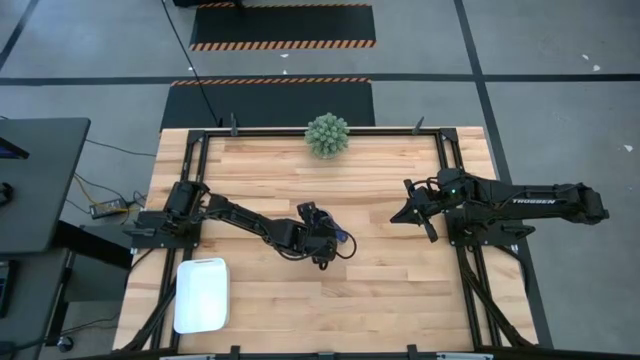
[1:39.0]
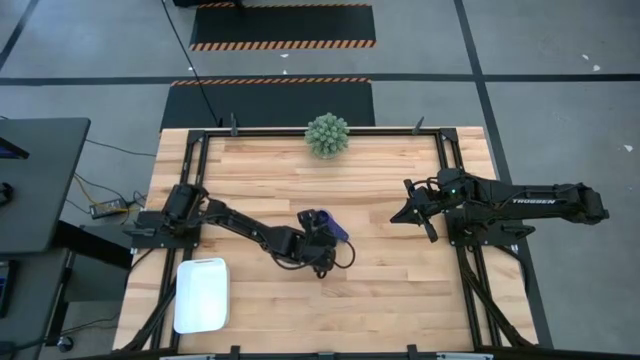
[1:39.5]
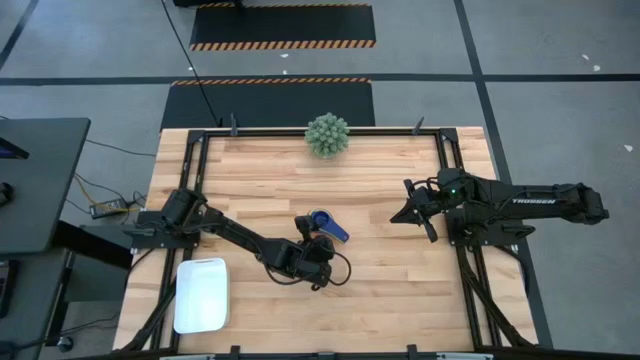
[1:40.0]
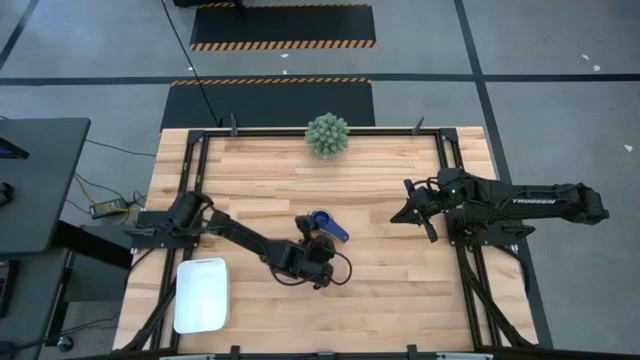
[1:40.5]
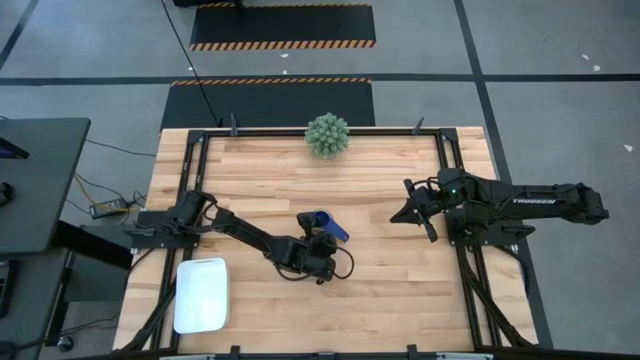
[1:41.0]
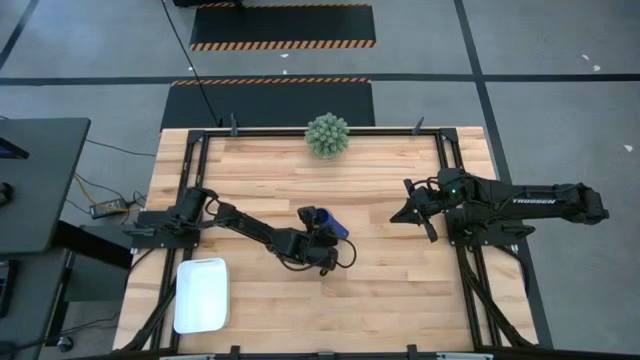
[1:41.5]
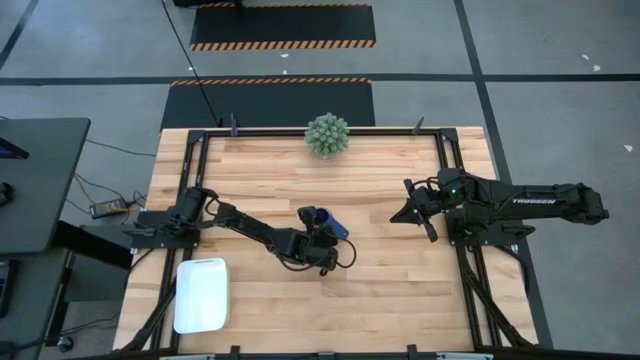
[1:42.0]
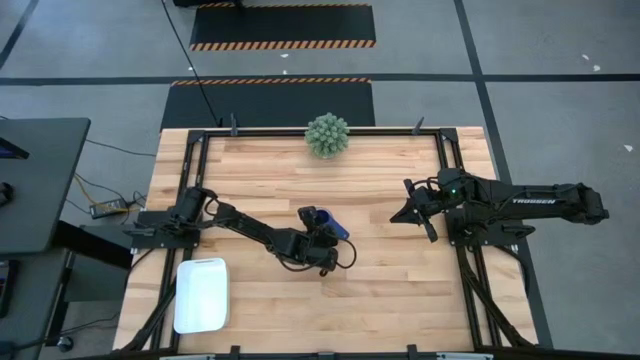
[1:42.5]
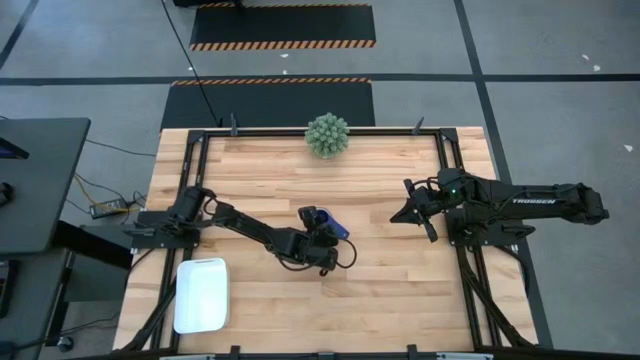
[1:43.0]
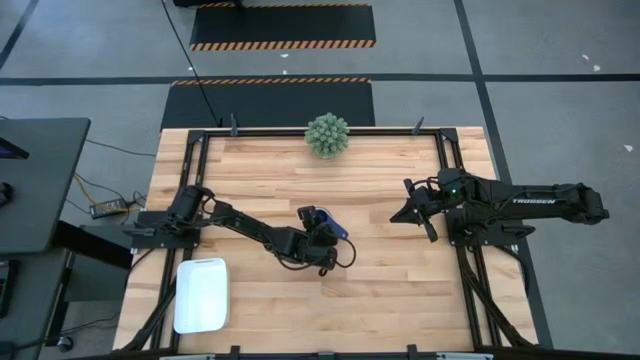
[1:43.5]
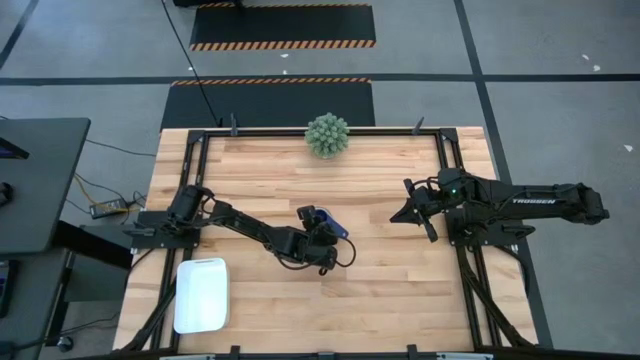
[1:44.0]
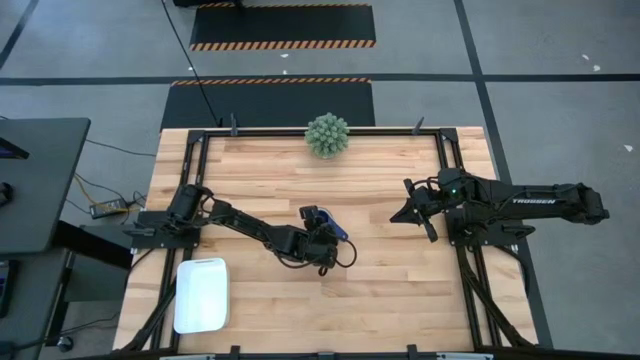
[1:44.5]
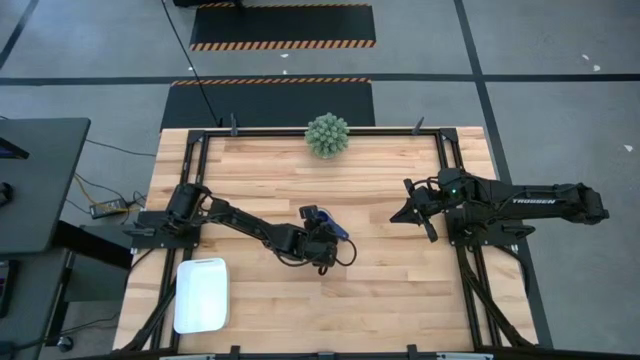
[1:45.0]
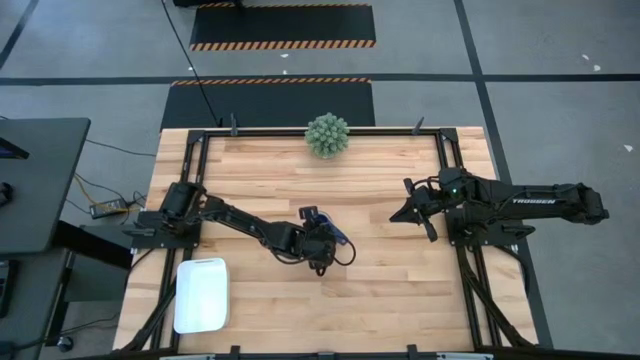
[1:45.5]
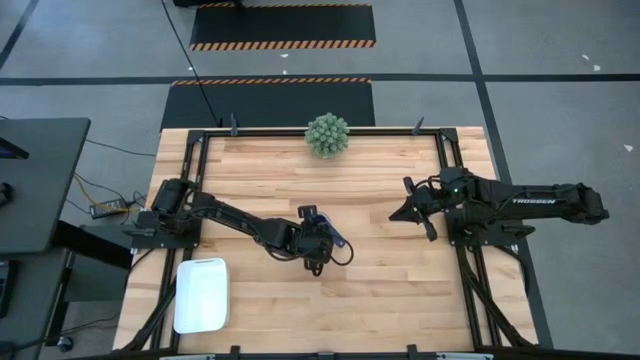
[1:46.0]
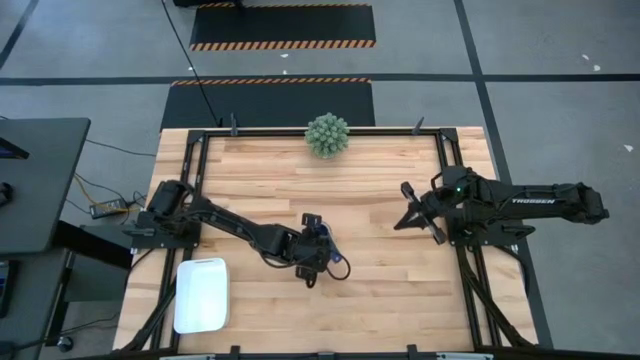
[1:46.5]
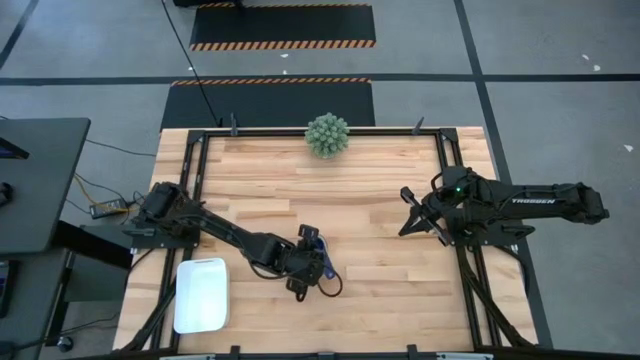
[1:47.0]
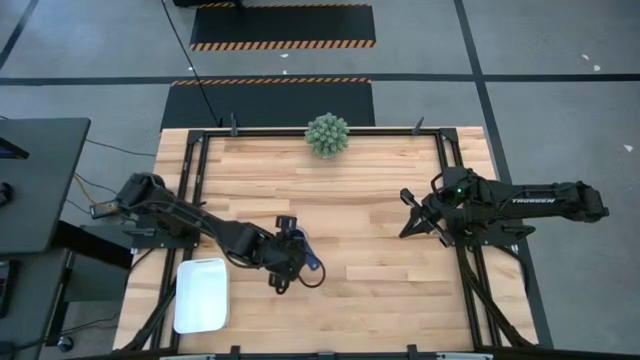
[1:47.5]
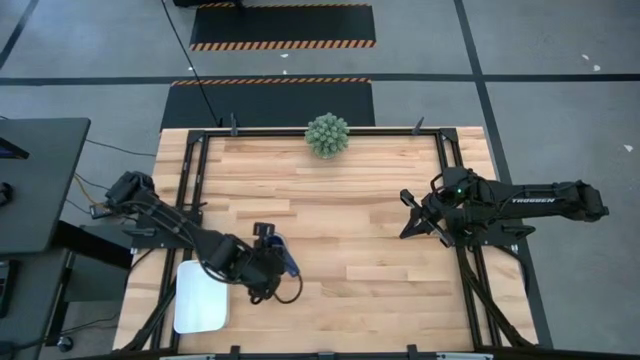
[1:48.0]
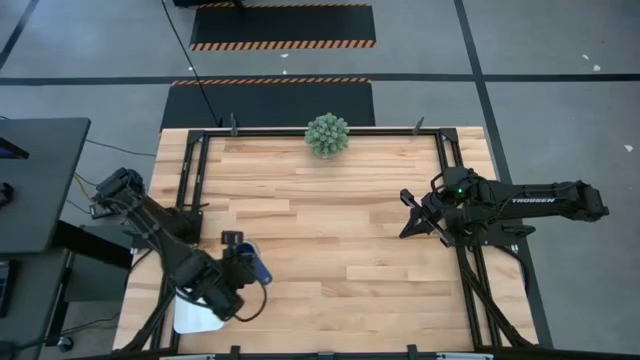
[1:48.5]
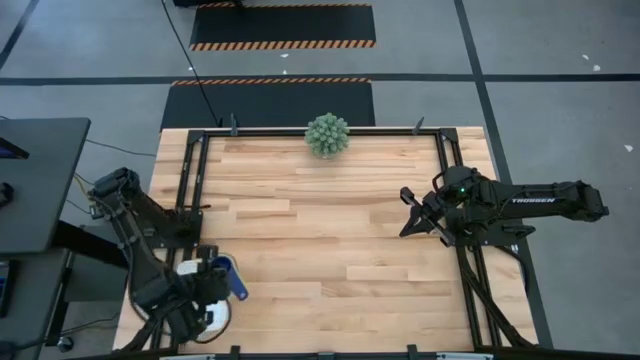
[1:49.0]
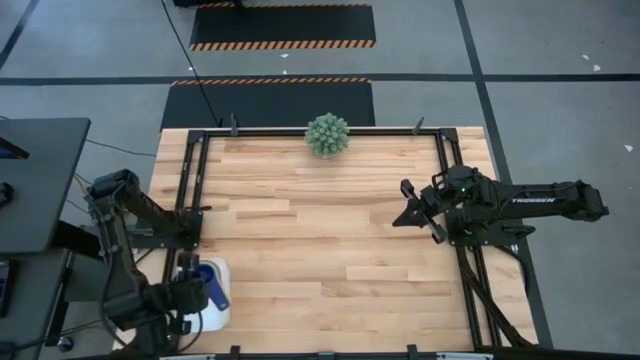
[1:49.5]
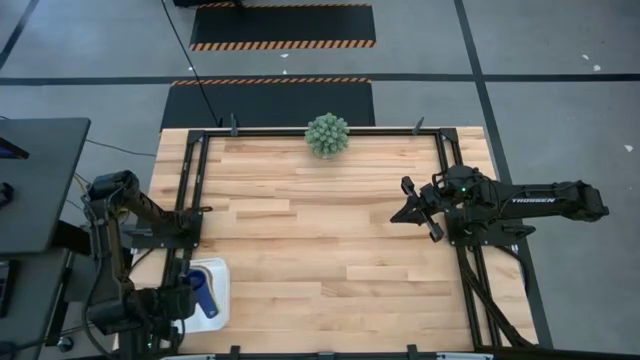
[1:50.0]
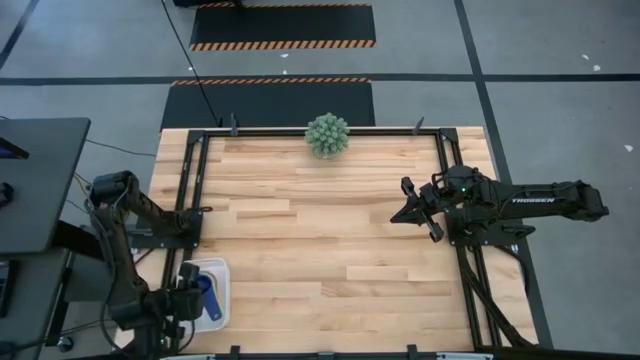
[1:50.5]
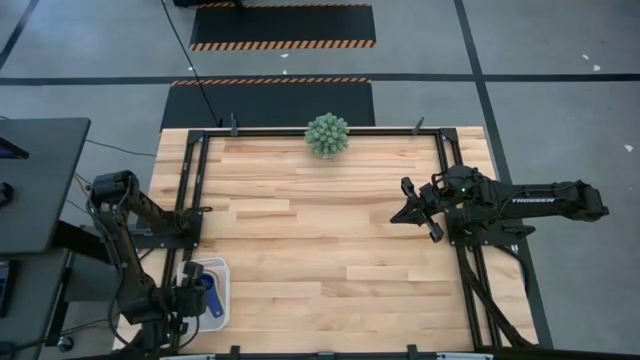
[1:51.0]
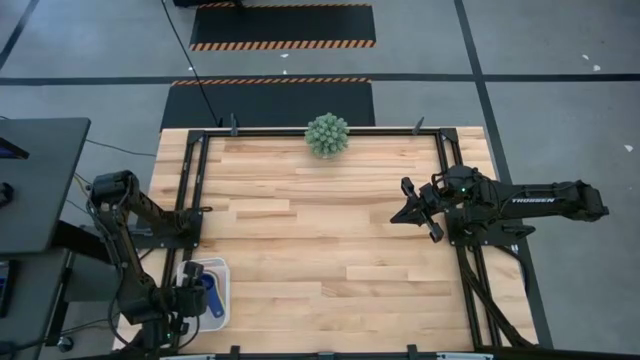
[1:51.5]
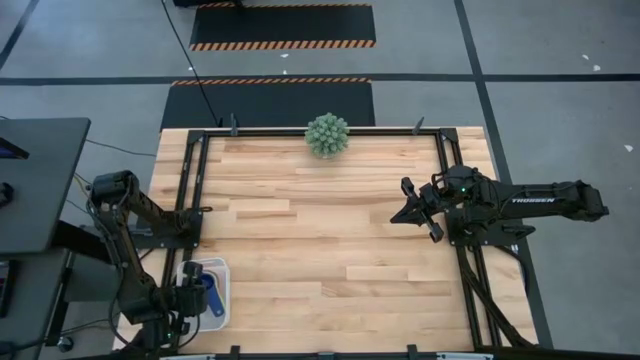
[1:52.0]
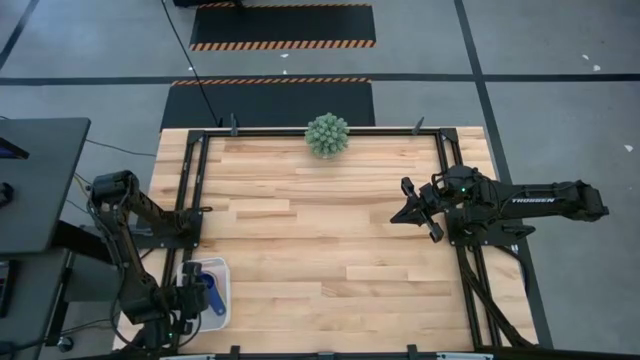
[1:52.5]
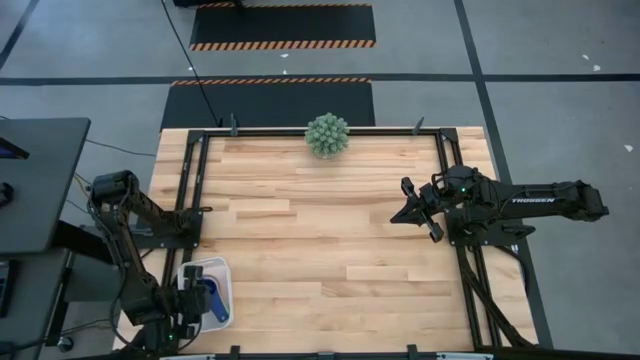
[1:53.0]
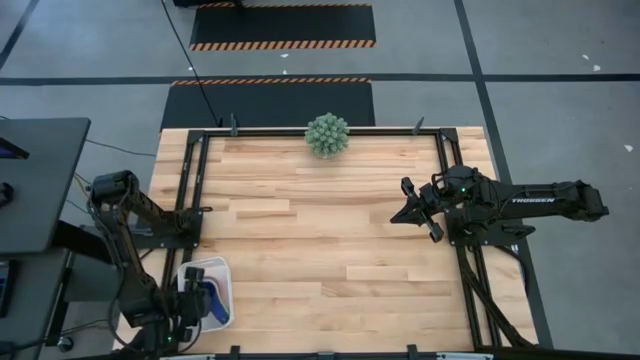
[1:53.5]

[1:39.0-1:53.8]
Task: Nest measuring cups in basket
Put the nested measuring cups into the white bin

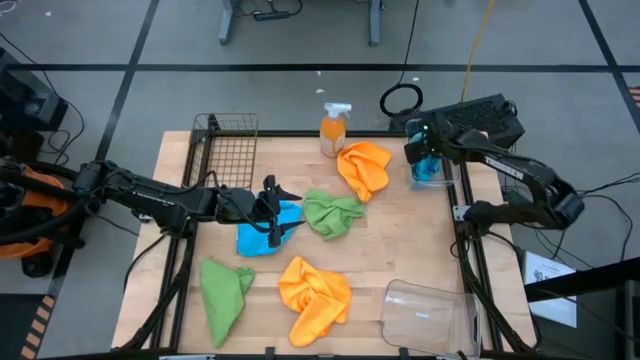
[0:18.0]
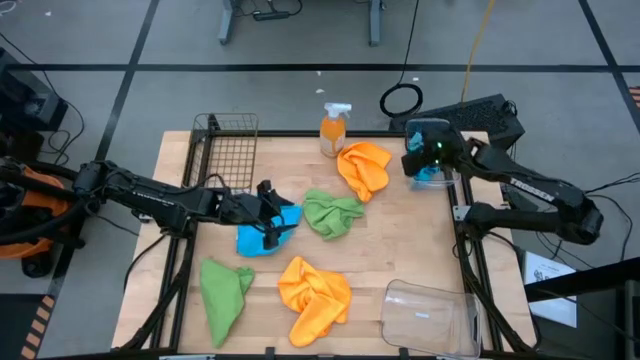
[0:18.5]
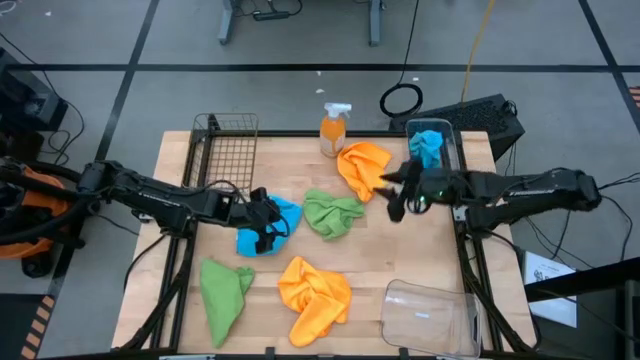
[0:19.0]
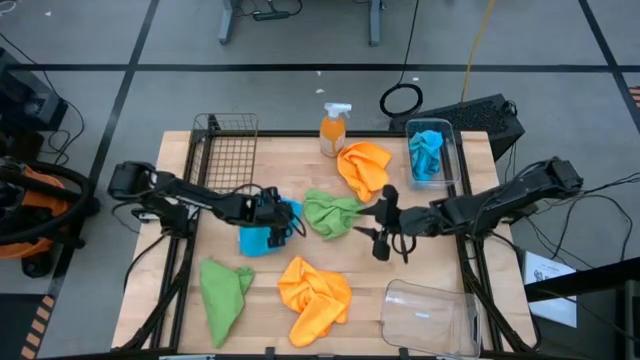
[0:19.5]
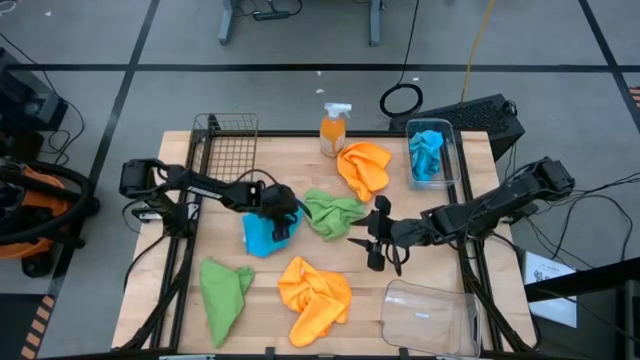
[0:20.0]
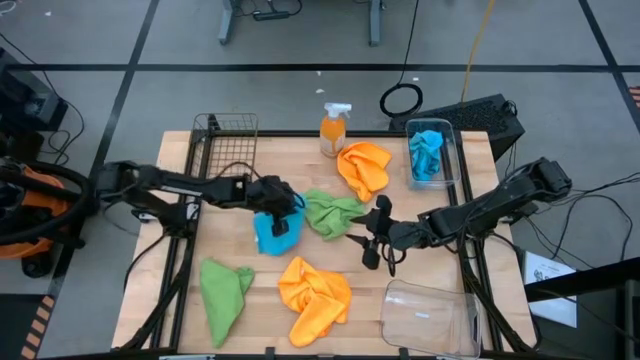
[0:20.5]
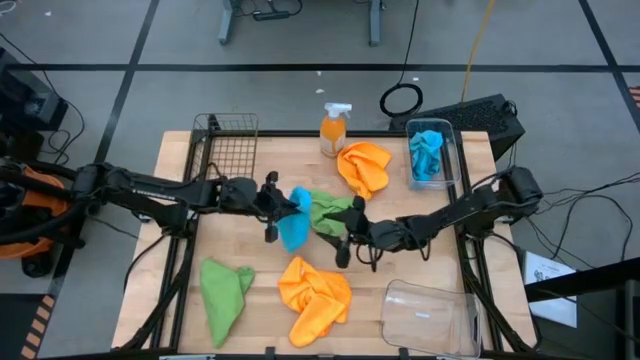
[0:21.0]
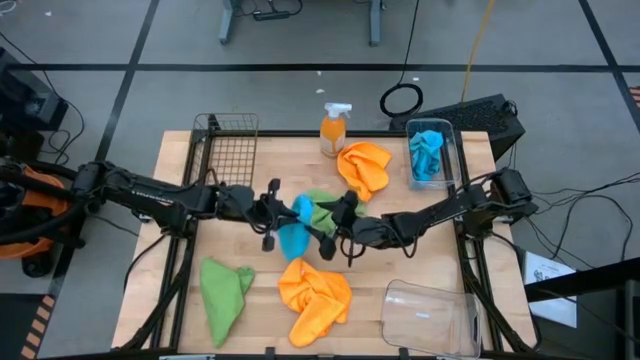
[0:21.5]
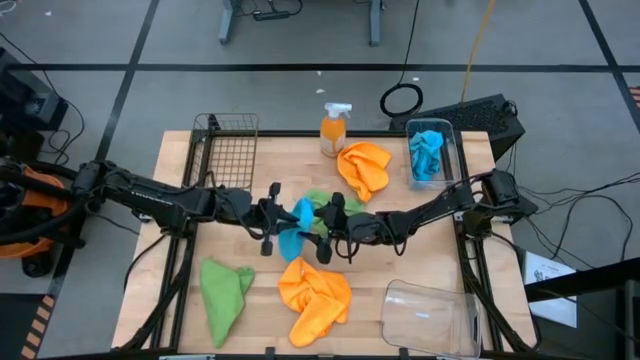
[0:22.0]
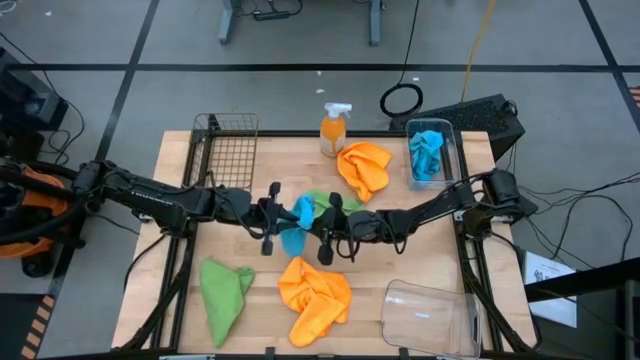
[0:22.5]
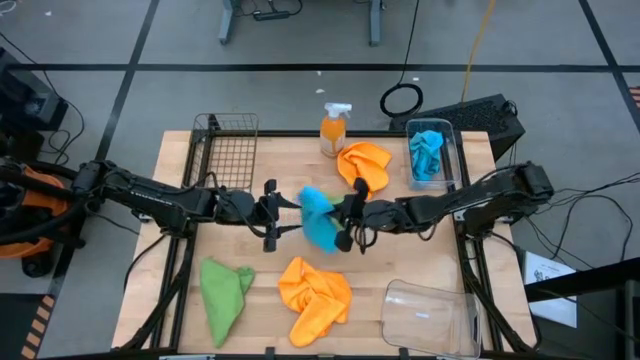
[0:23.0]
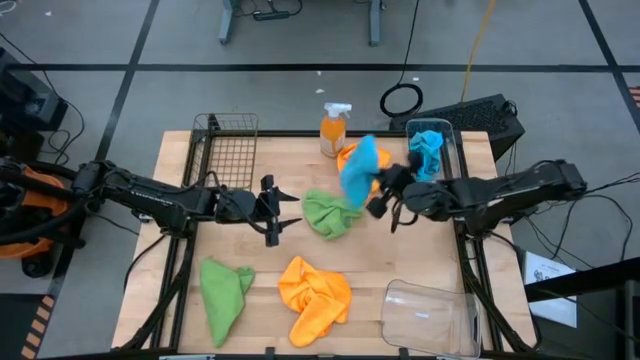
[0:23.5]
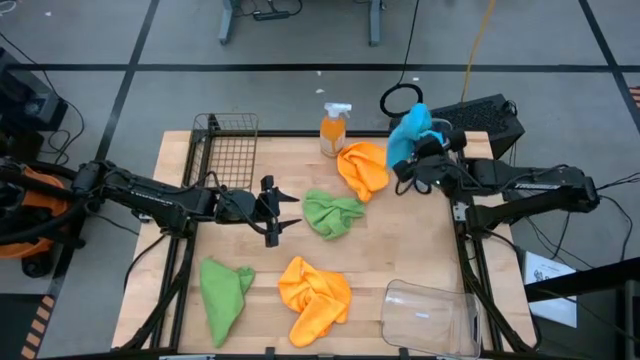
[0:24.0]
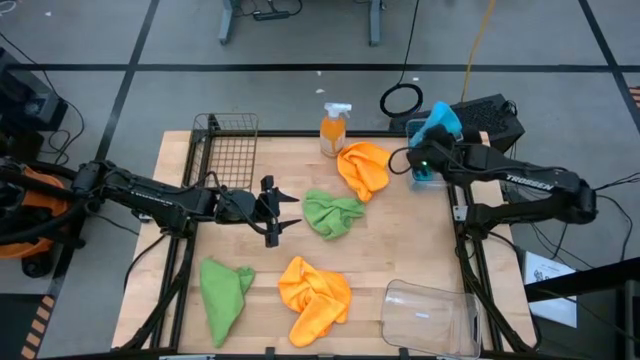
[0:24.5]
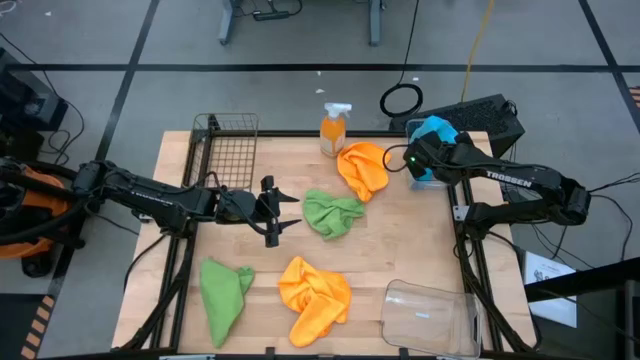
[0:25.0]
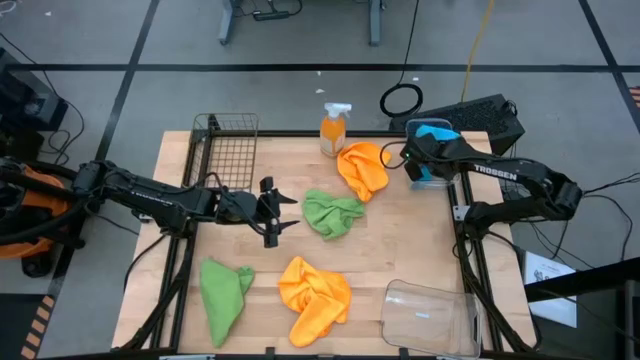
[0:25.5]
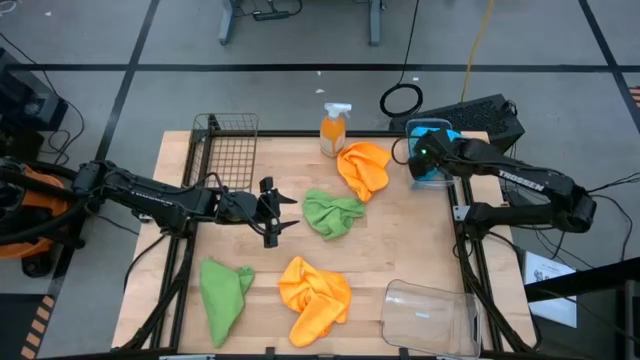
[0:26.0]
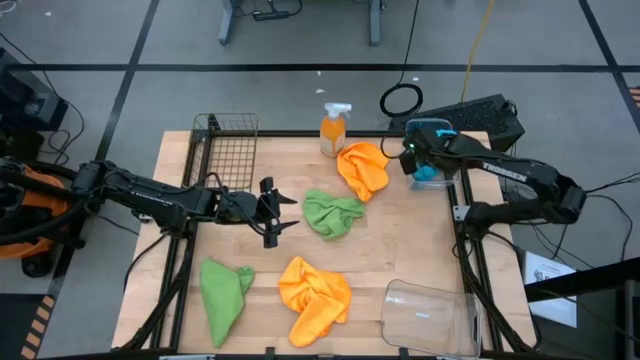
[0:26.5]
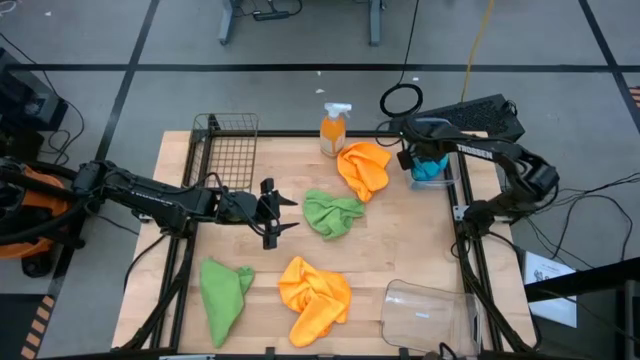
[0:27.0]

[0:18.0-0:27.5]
Task: Sort microfiber towel by color & place in baskets
Put the blue microfiber towel into the top transparent bin
